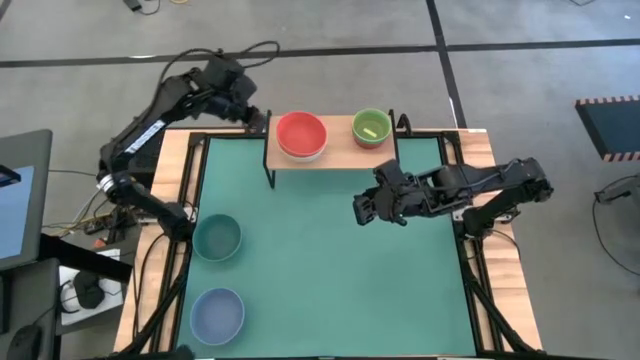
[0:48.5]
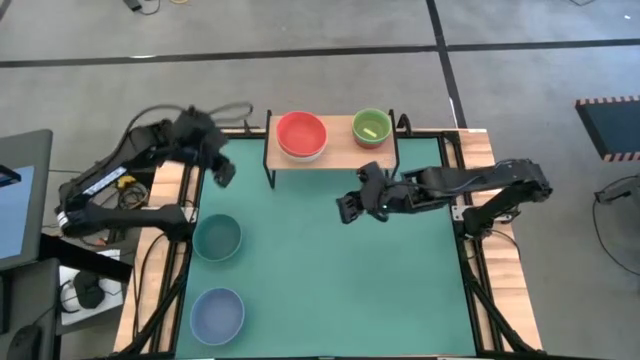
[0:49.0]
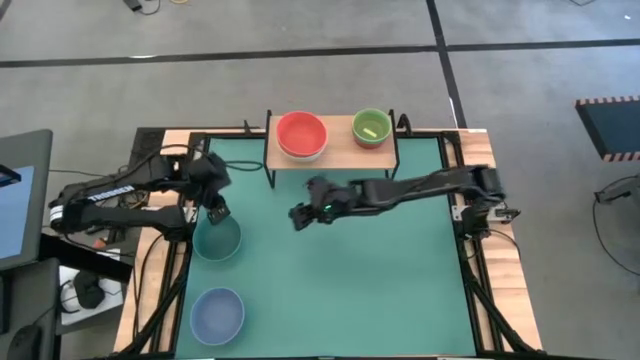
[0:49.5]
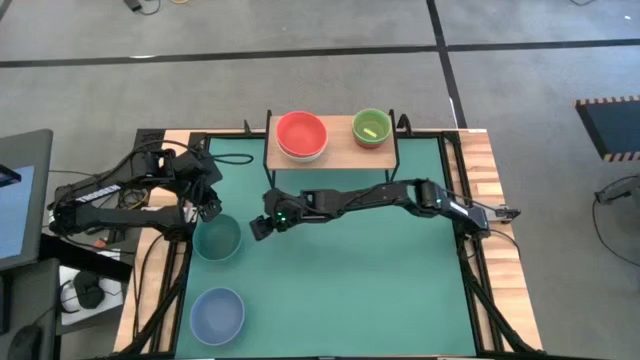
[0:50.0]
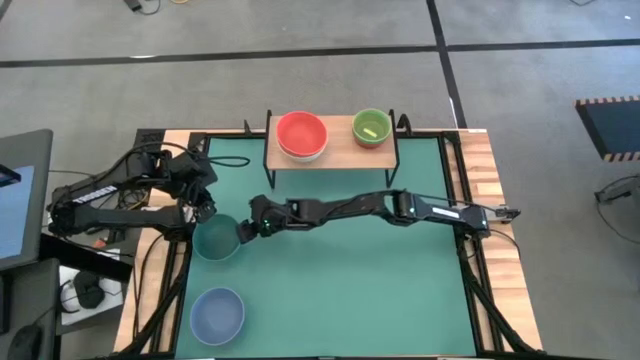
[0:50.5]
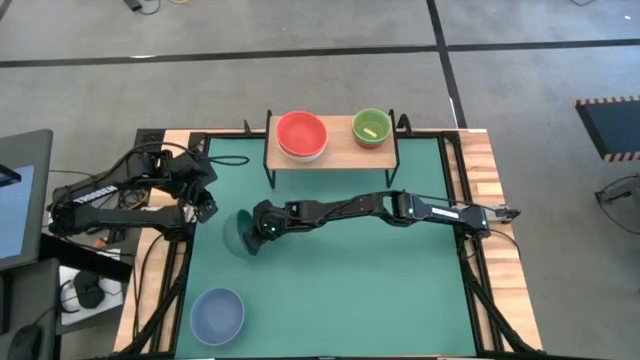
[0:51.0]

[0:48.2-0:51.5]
Task: Place and stack bowls onto a shelf
Stack the large green bowl on top of the large orange bowl on the shelf

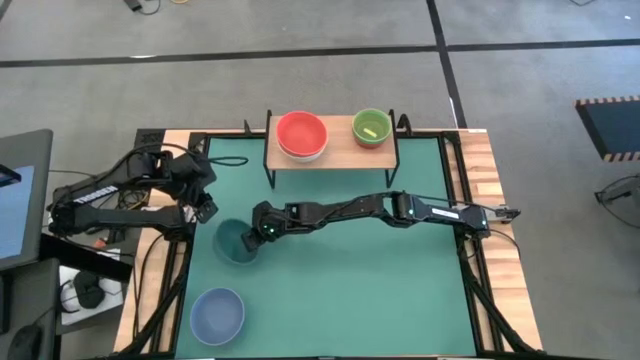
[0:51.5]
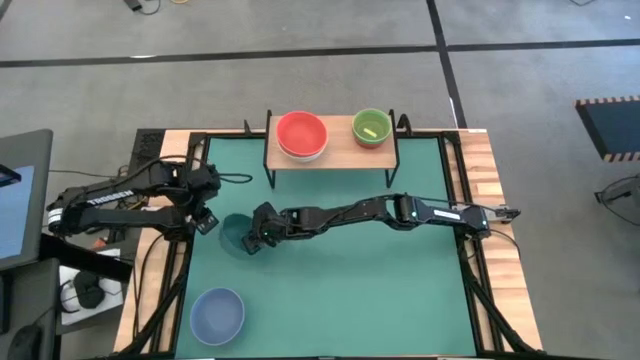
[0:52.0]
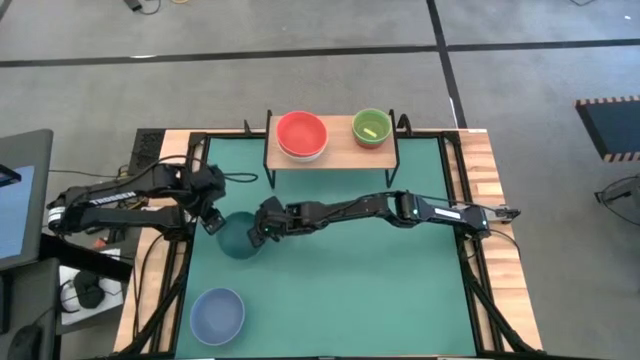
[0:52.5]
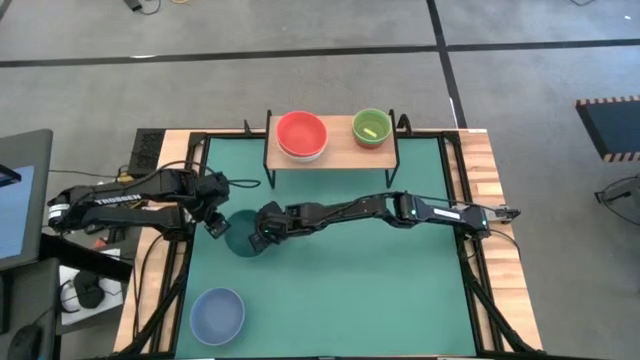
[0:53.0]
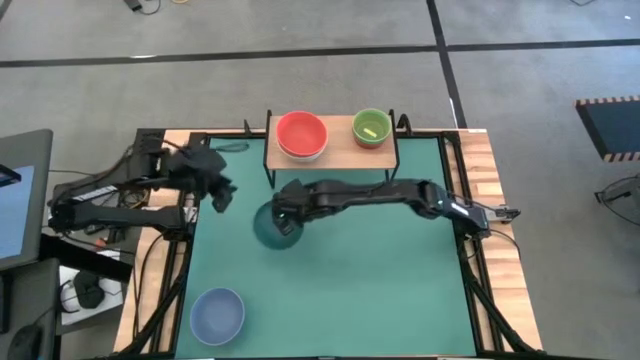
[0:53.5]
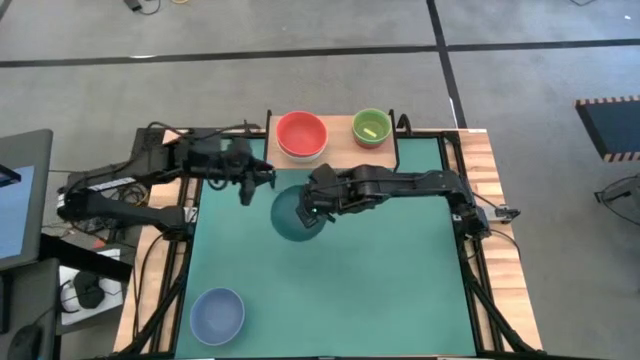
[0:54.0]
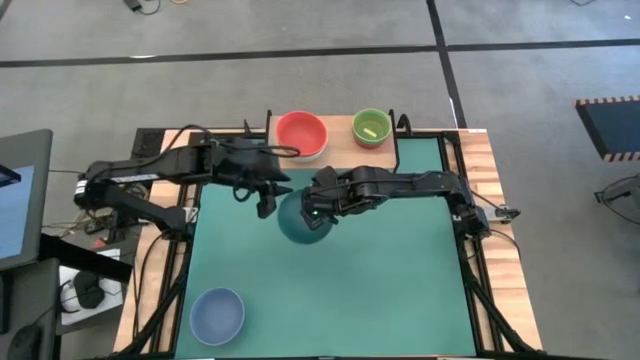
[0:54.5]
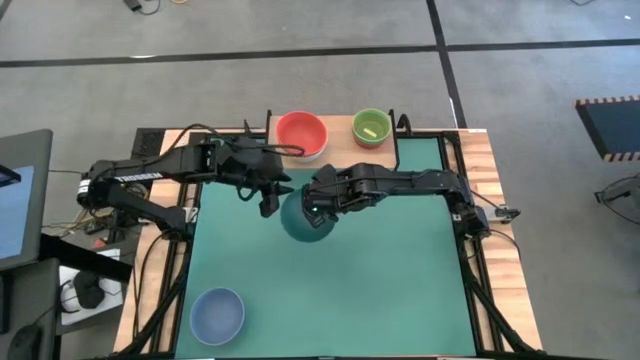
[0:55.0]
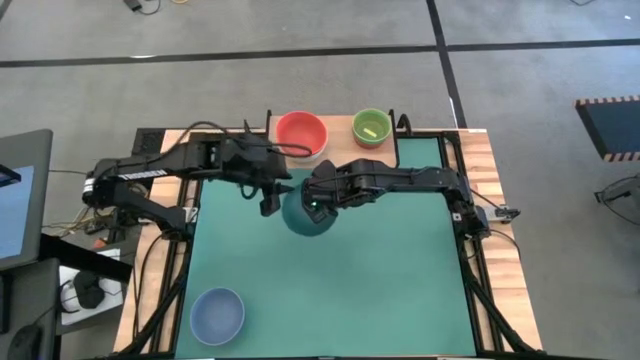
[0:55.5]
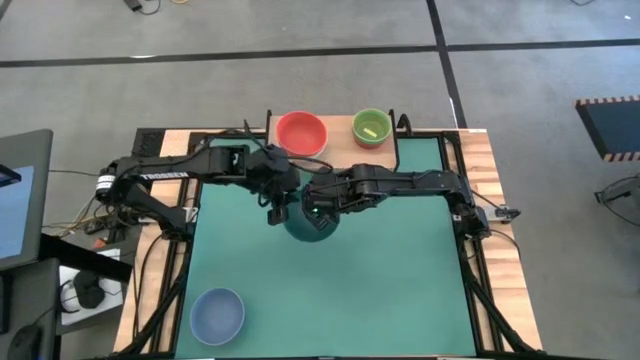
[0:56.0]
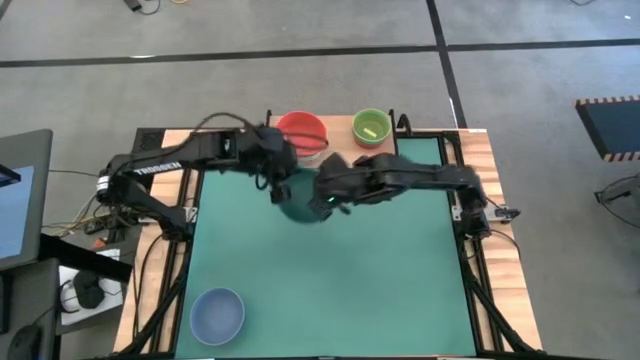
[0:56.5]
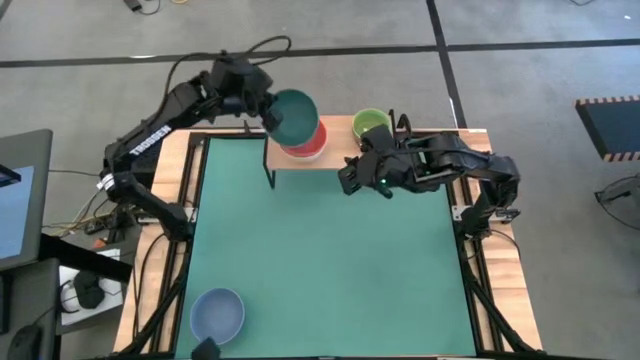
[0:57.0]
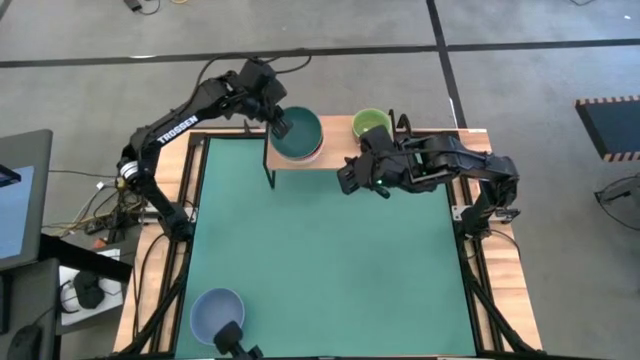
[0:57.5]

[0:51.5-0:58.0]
Stack the large green bowl on top of the large orange bowl on the shelf

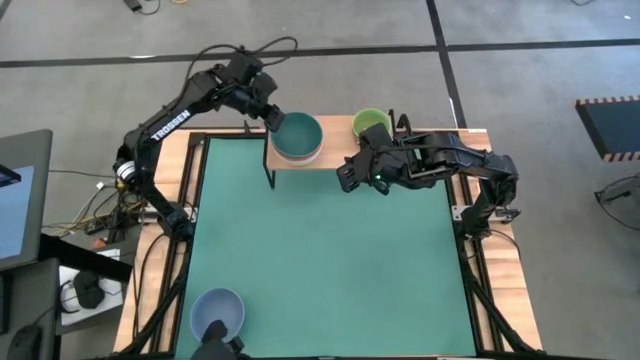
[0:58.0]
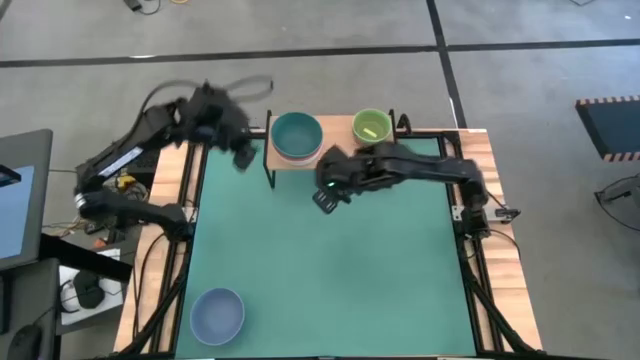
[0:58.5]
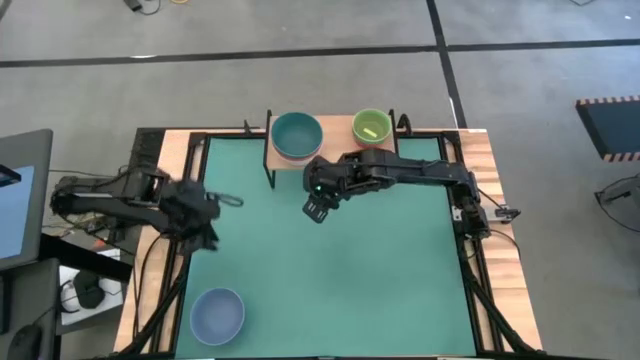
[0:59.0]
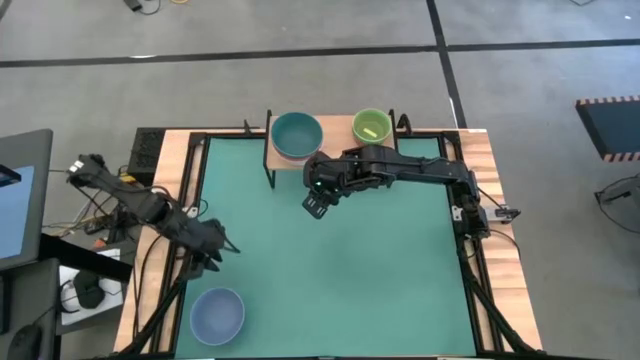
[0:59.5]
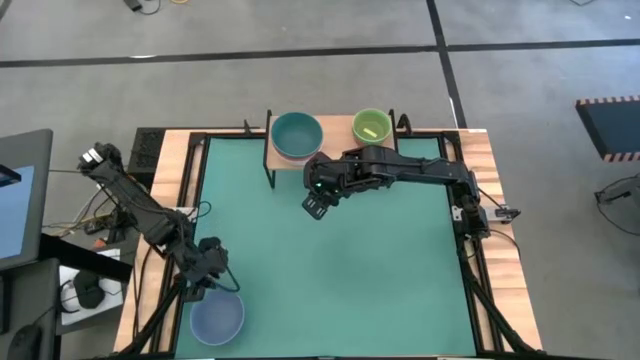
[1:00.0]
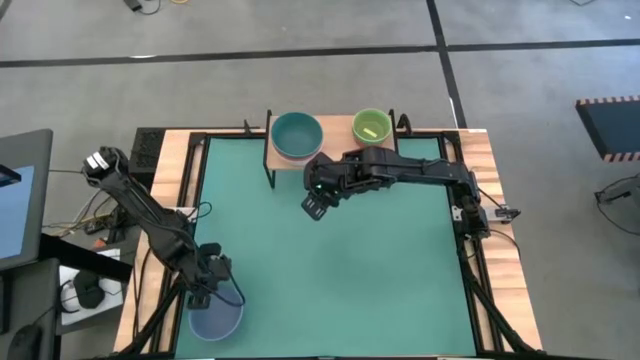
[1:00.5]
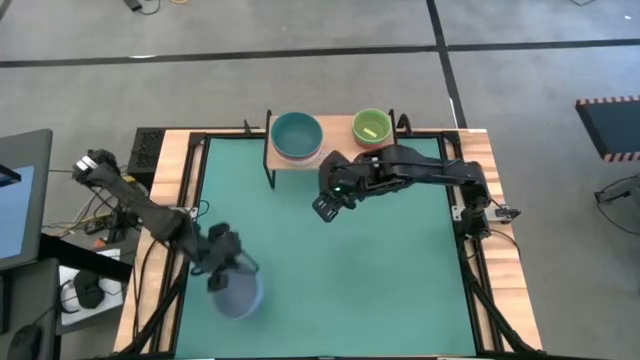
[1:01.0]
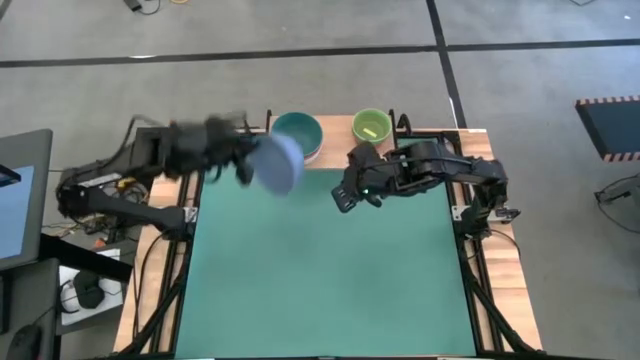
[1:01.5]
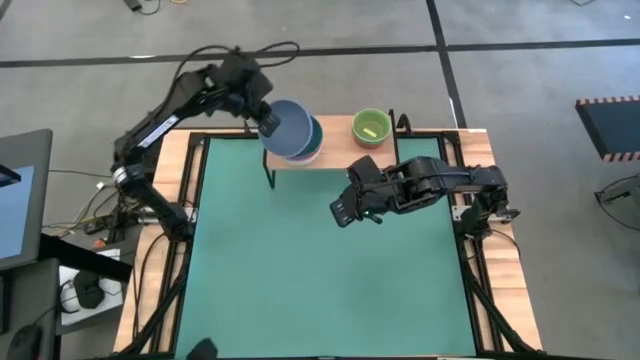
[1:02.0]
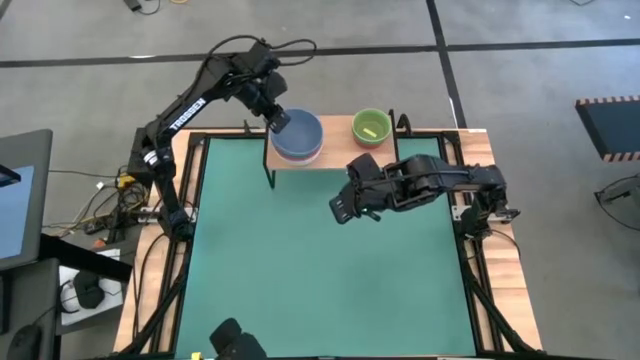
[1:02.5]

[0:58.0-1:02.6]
Stack the large light blue bowl on top of the large green bowl on the shelf

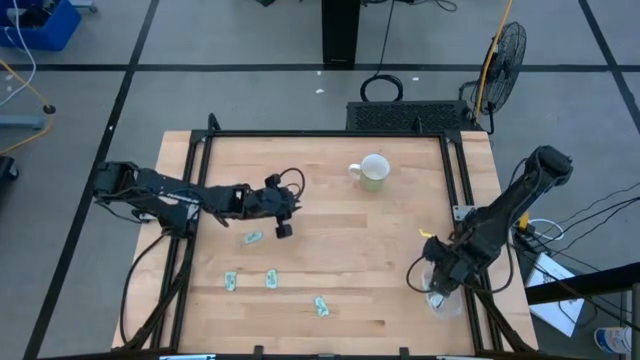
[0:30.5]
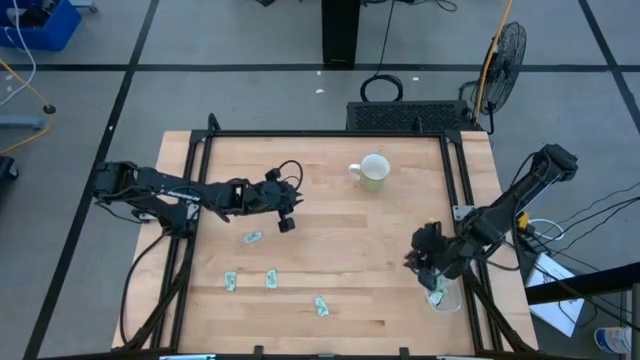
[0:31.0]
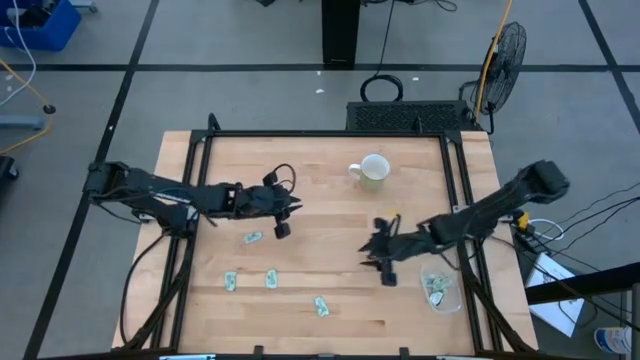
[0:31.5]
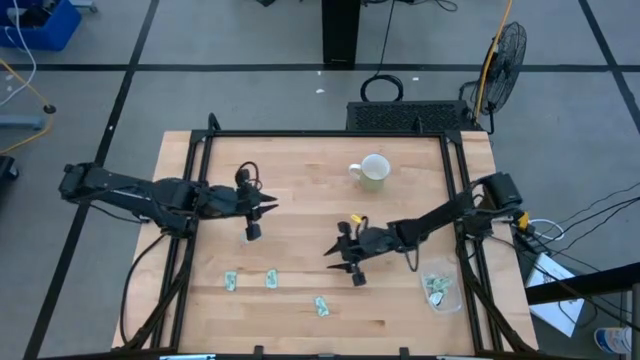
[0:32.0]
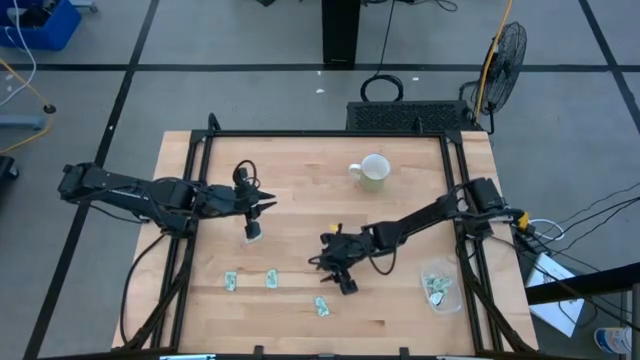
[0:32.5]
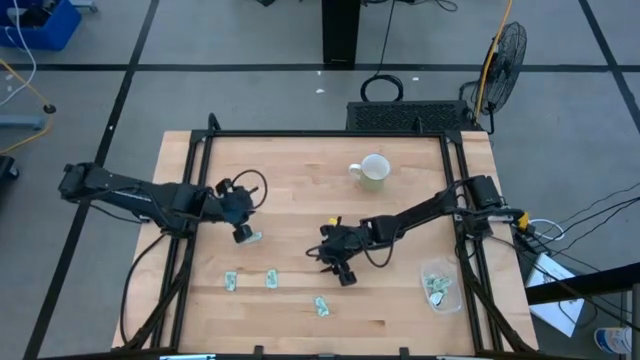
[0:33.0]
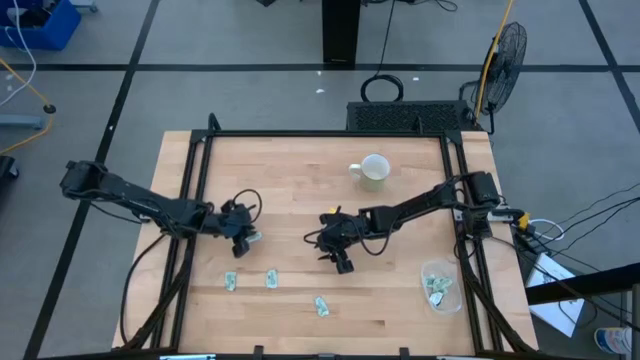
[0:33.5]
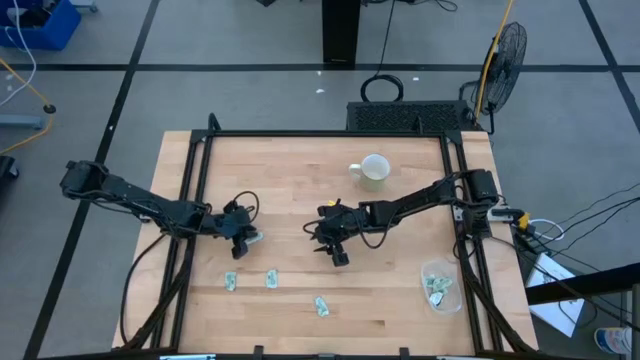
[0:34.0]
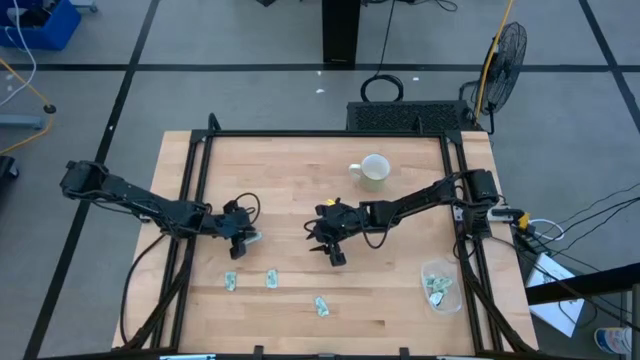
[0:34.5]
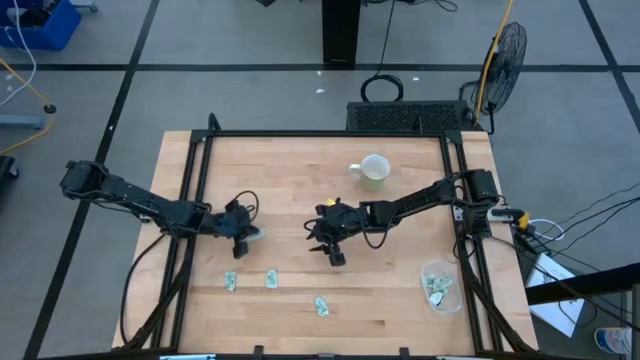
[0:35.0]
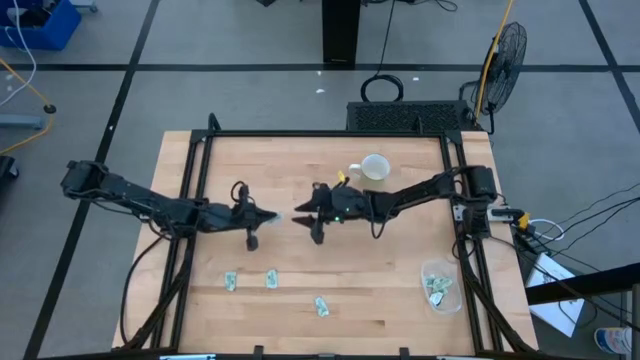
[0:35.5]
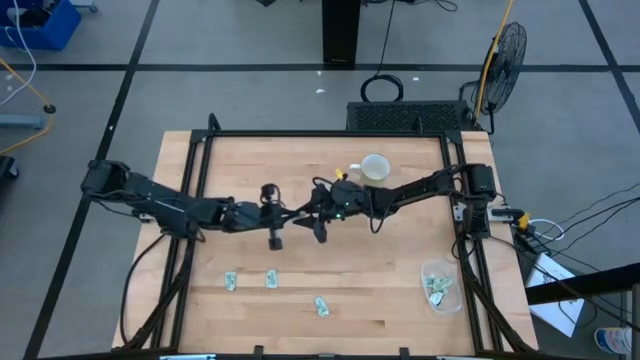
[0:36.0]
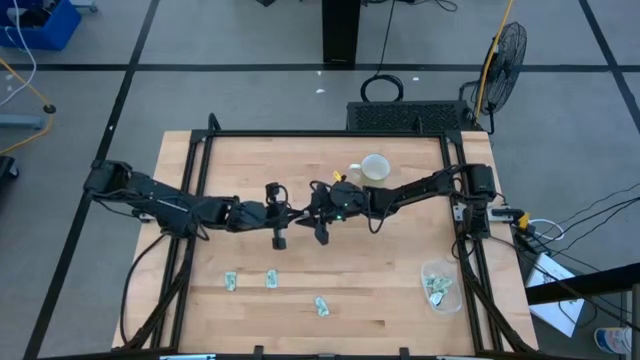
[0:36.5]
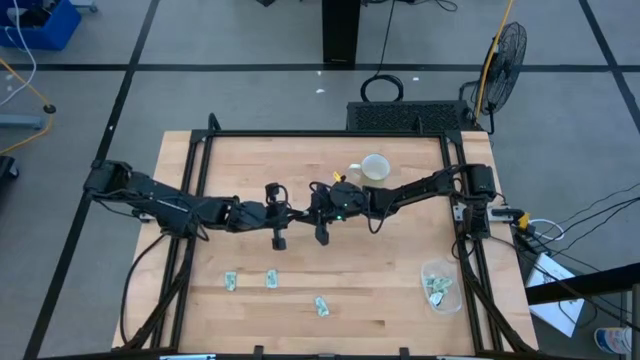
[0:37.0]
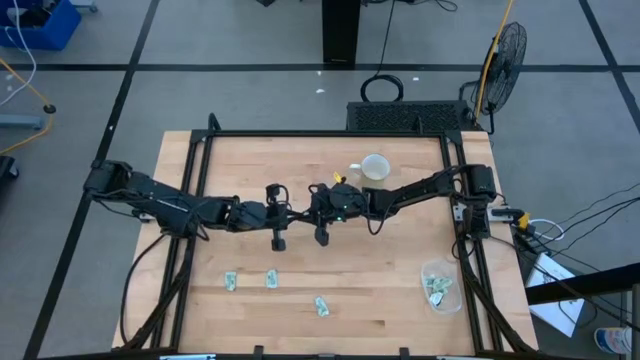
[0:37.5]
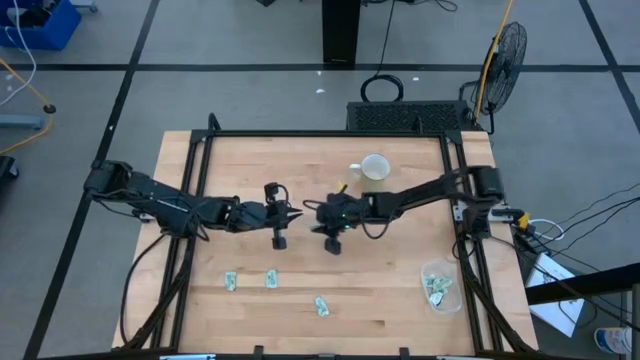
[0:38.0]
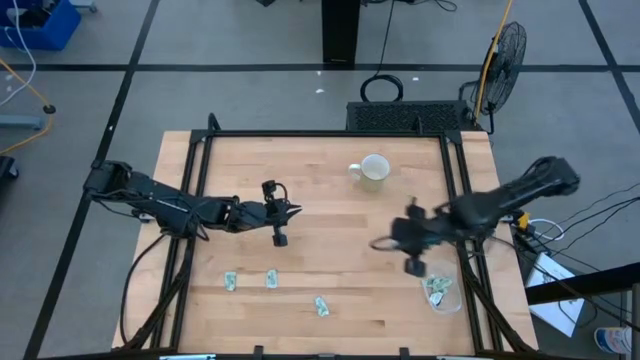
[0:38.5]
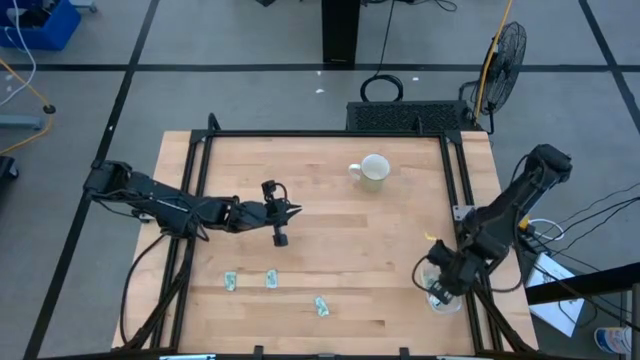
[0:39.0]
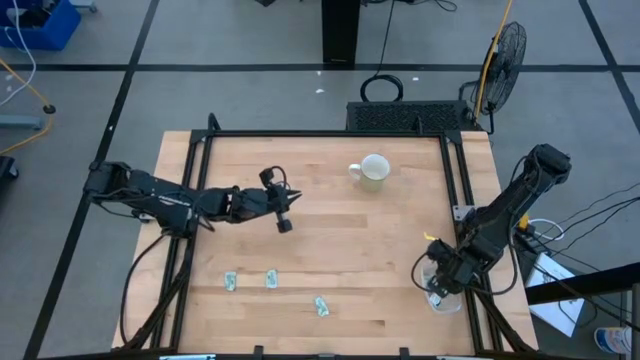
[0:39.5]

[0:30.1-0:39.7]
Task: Pick and place Stevia / Truvia into bins
Put the stevia packet into the transparent bin
